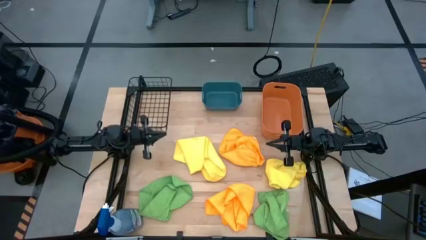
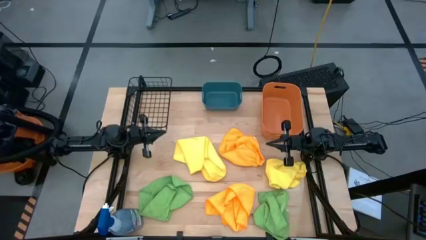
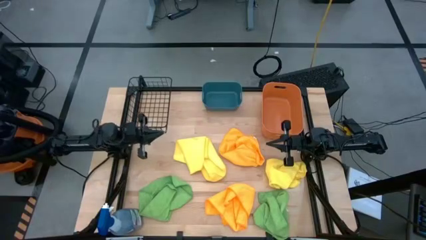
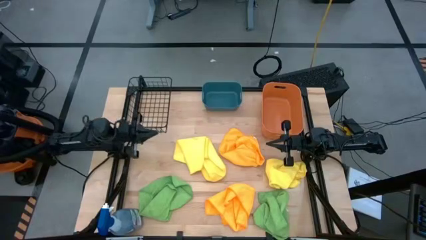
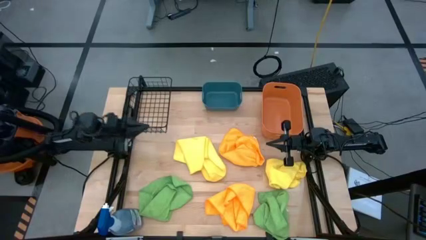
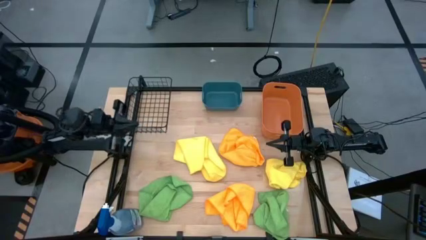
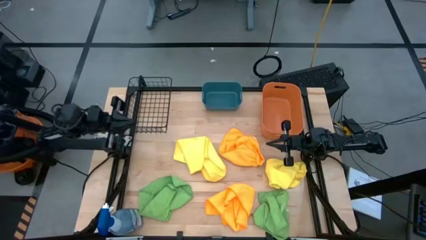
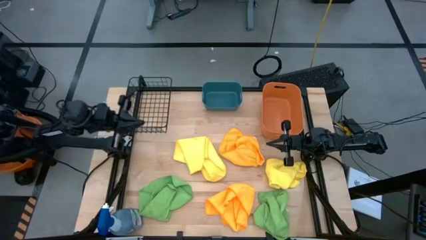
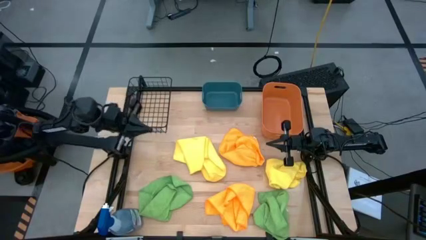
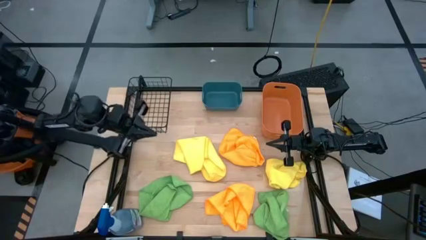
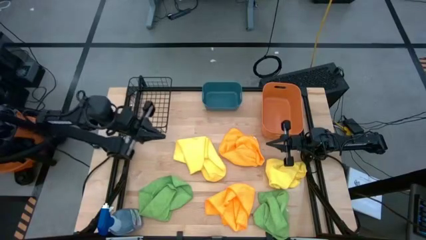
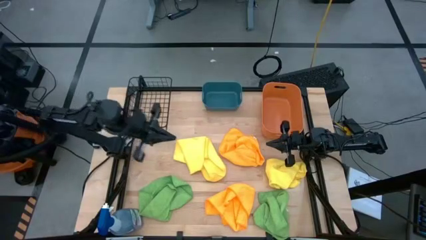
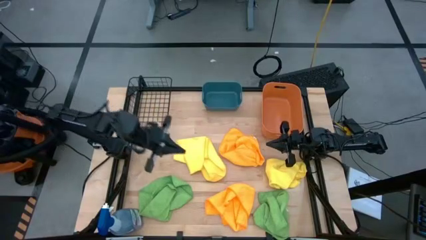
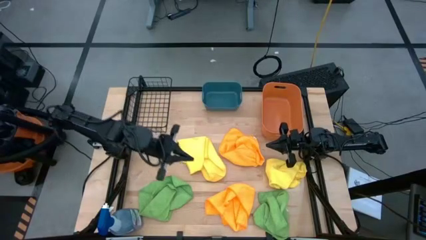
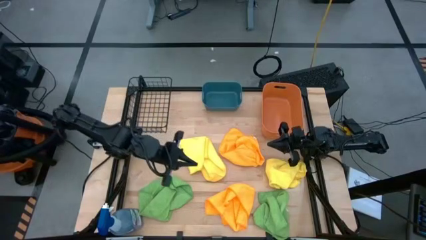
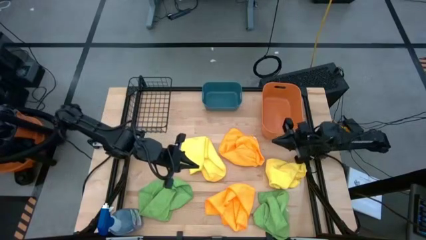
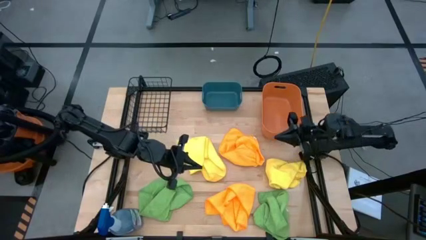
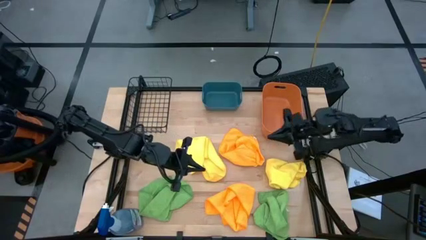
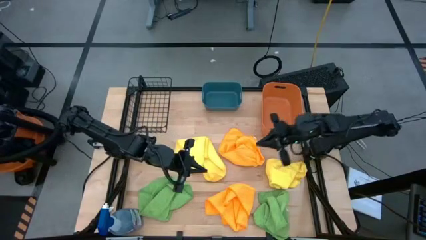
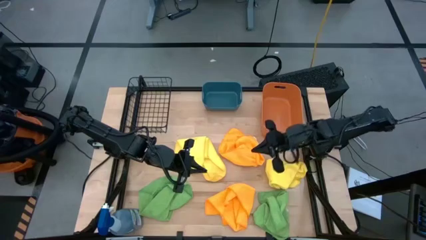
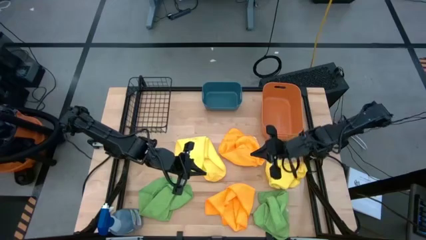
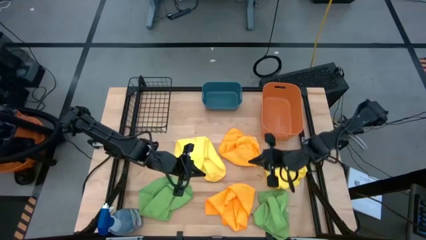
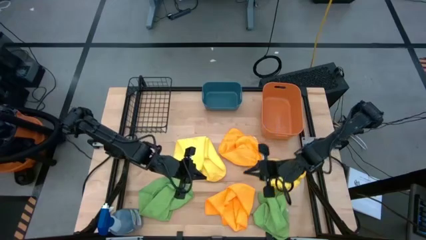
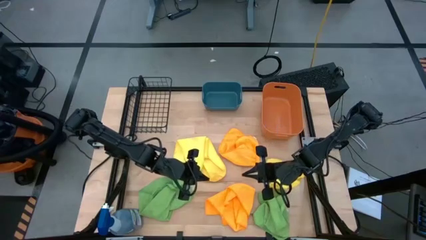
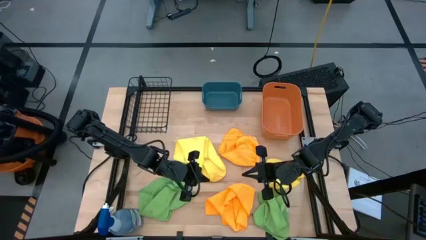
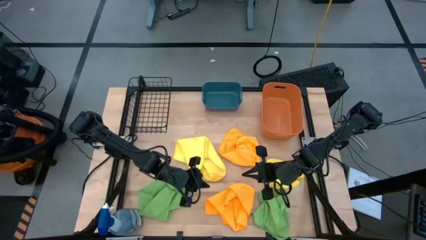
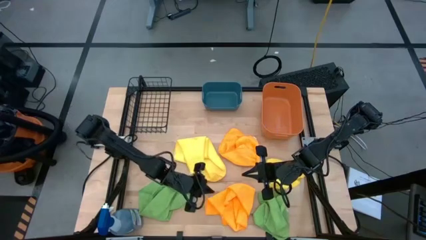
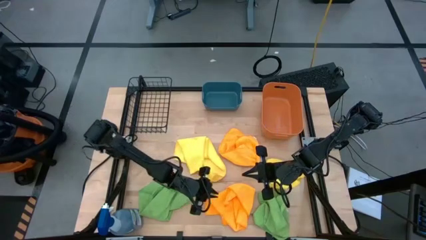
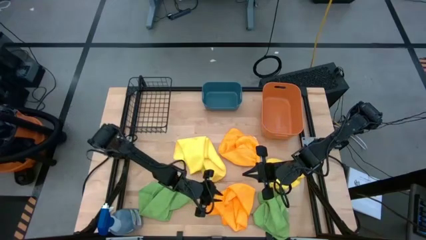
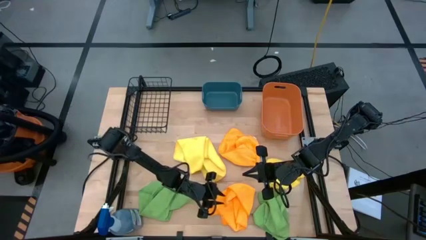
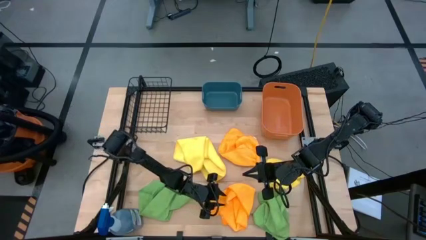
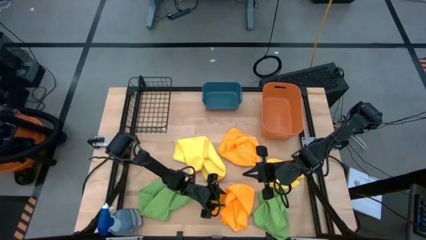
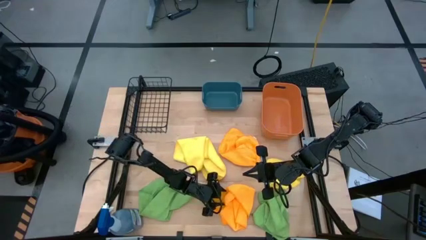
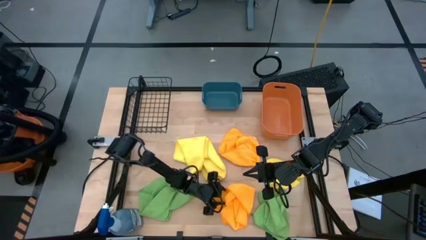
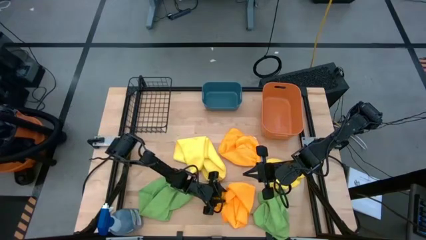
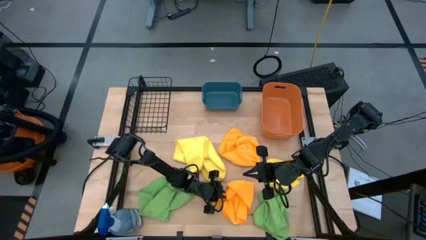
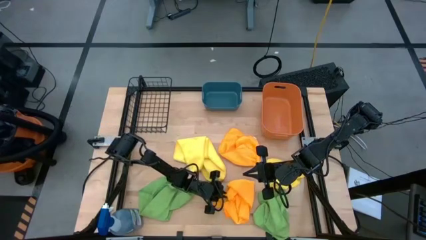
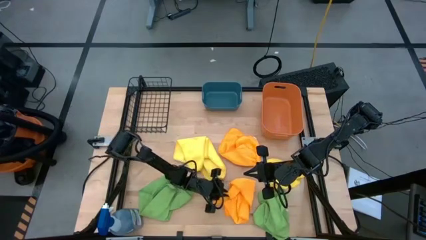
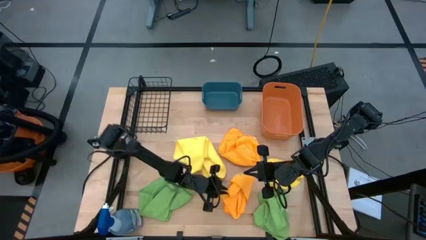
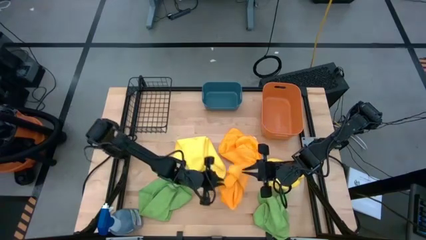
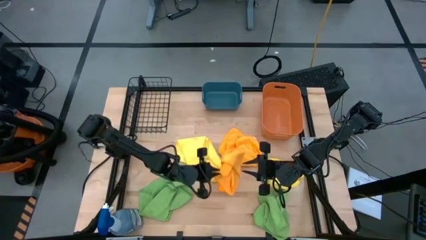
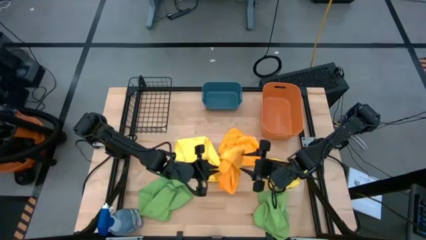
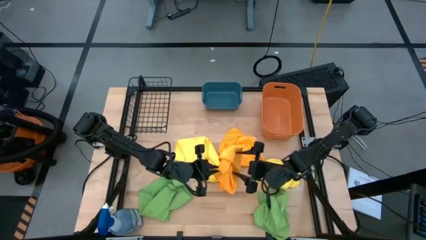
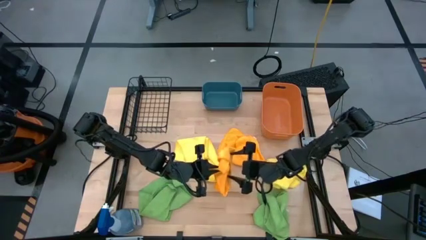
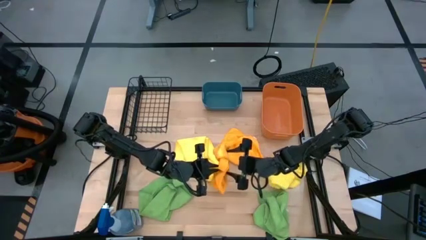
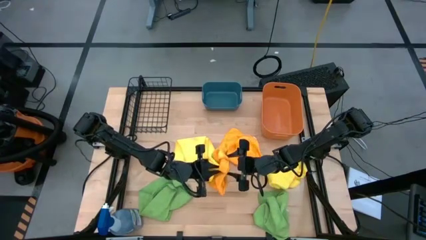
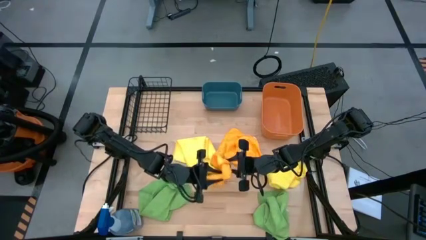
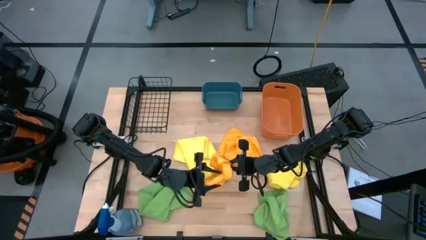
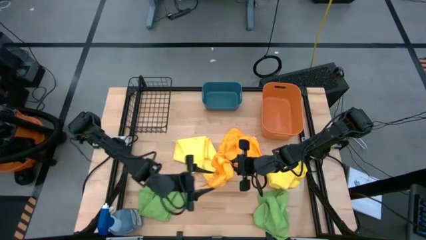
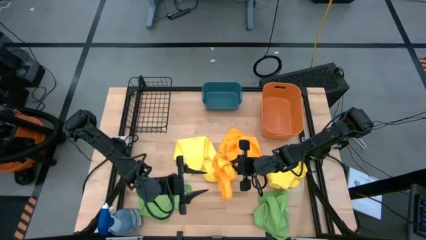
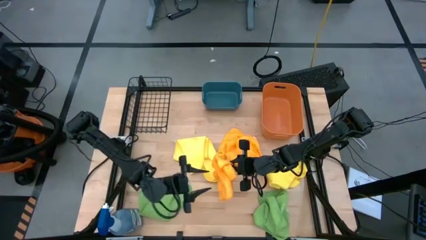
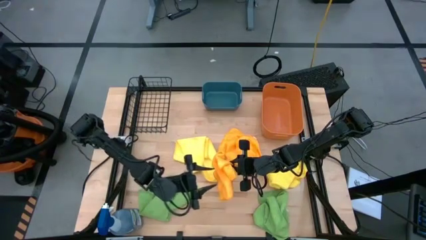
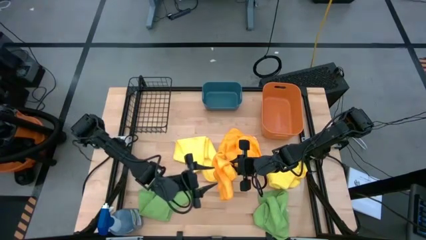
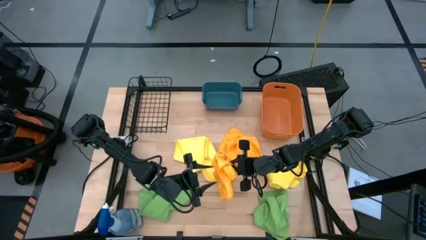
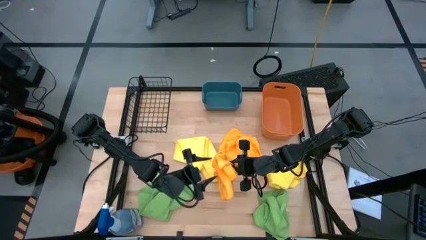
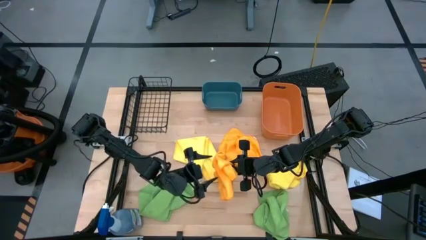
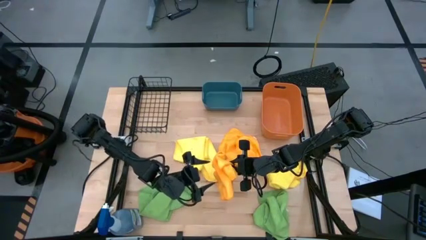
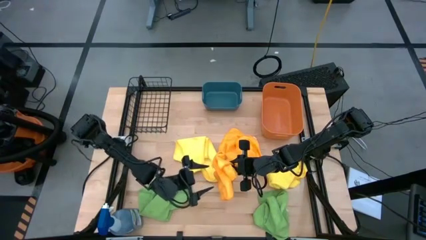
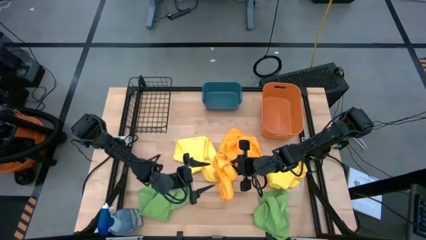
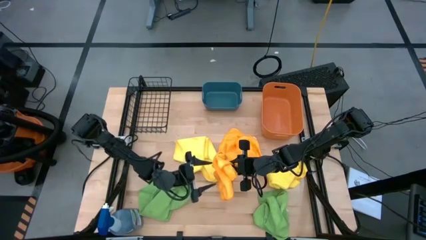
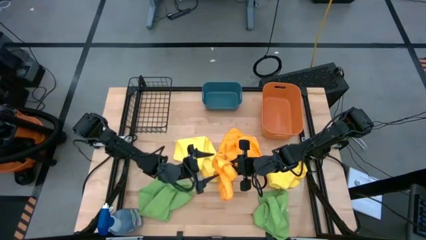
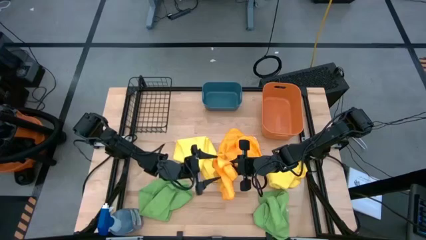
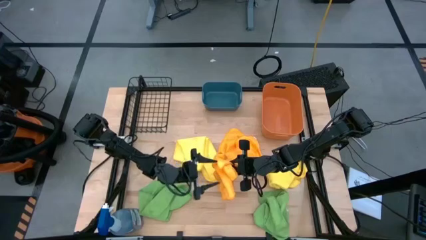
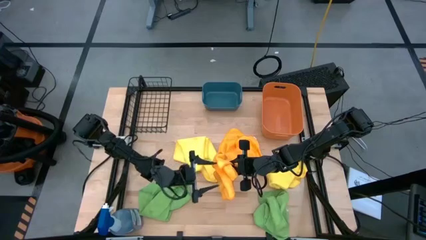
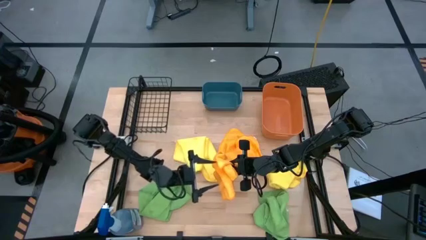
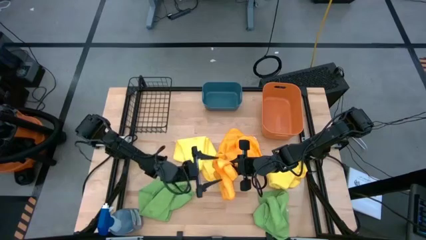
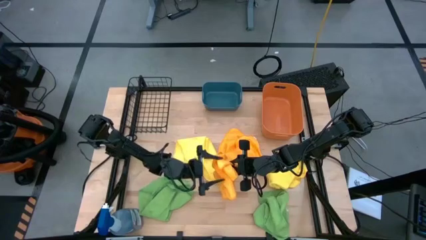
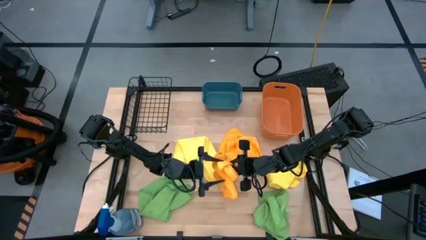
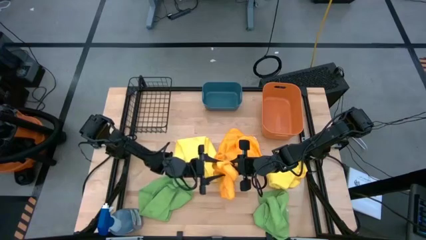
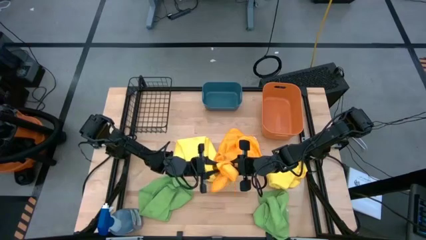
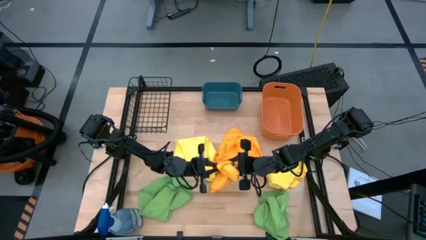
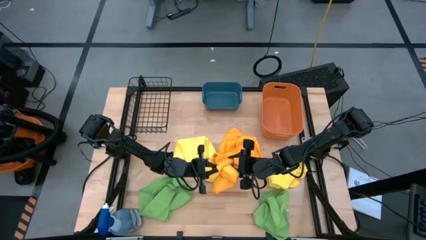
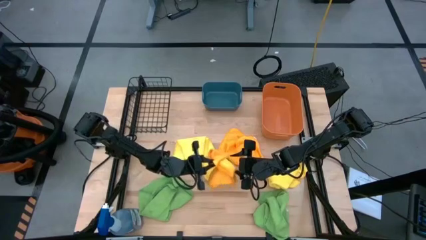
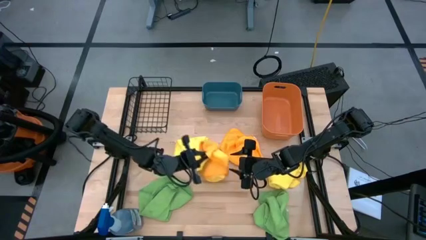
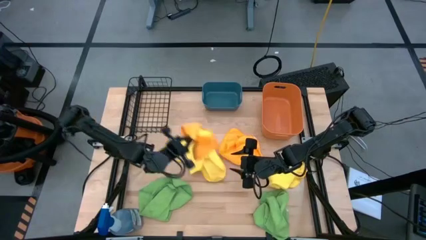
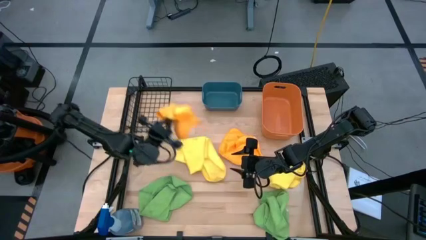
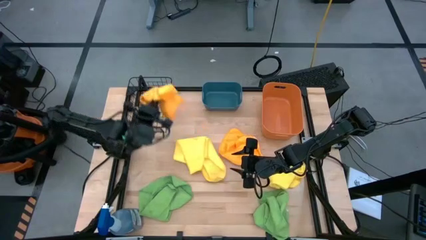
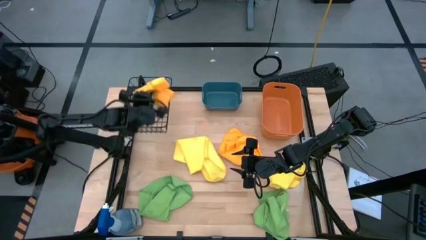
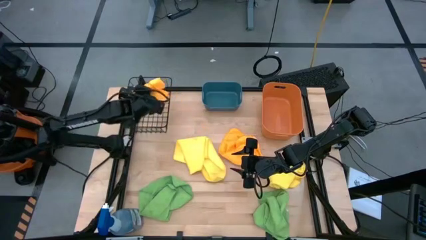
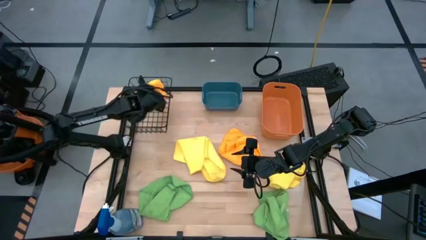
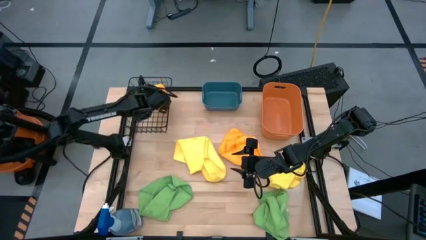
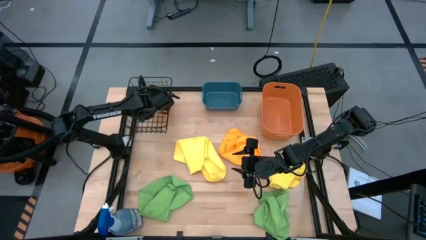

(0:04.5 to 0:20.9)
Task: Sort microfiber towel by color & place in baskets
Put the bottom orange microfiber cloth into the black wire basket
